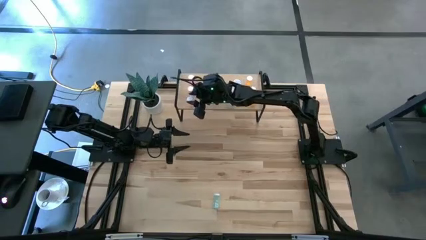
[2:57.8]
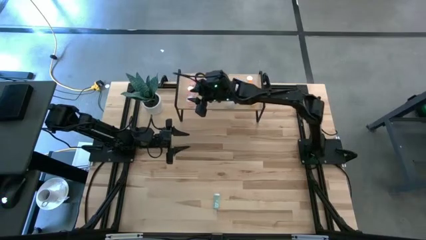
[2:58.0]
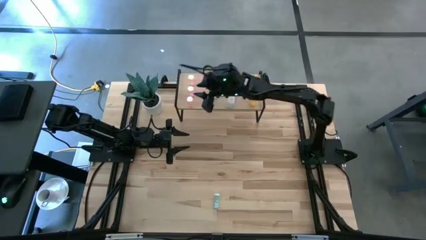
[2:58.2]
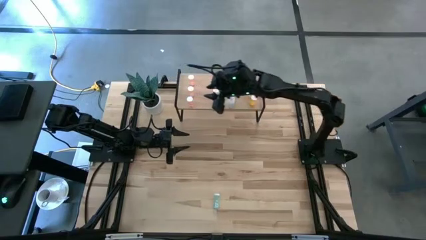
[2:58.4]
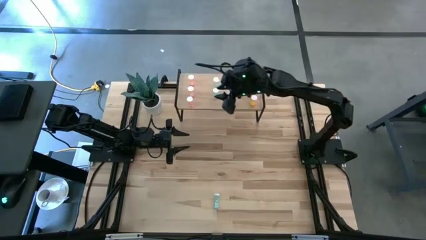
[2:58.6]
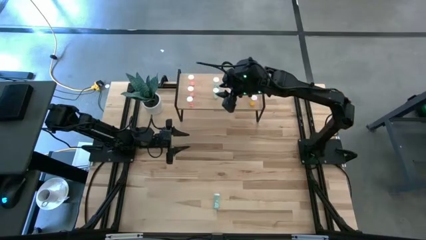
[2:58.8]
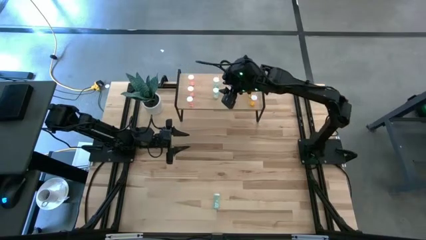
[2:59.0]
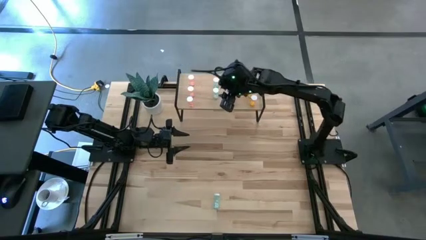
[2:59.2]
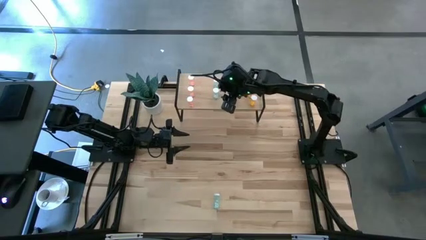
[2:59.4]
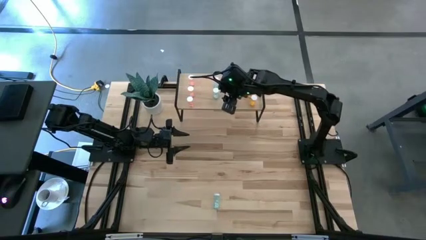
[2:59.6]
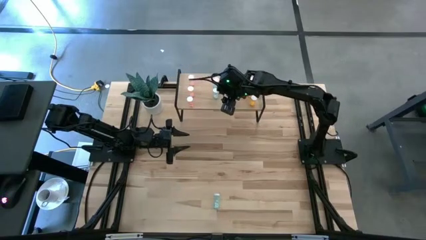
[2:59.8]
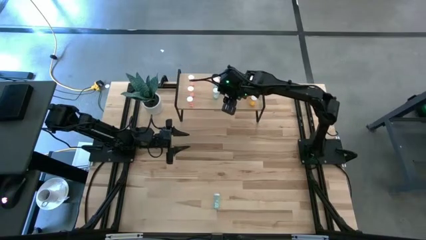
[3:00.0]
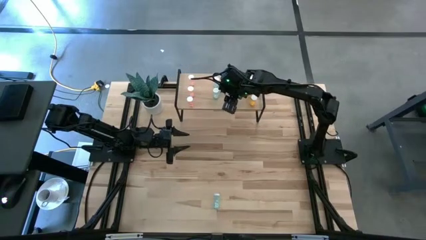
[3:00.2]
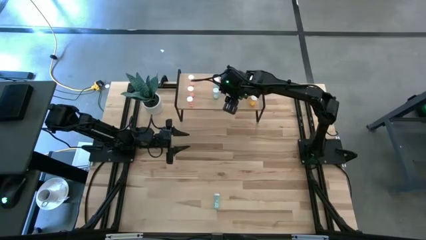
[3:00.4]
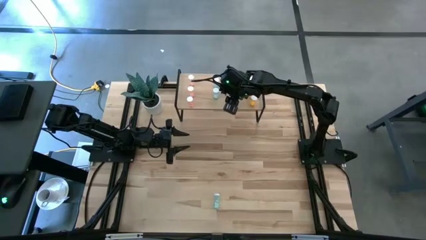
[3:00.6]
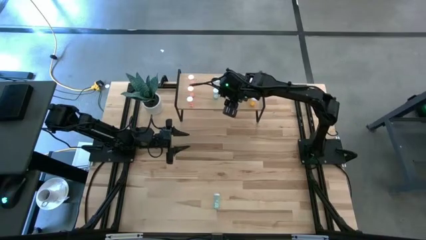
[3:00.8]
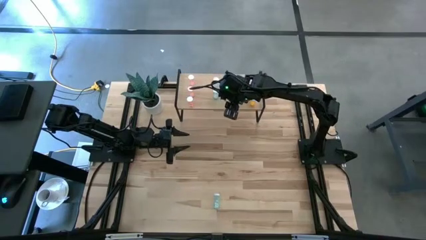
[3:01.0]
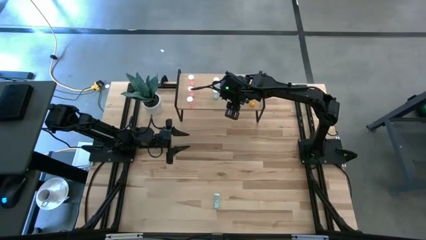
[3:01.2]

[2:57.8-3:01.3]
Task: Pick and place medicine bottles onto shelf by color
Adjust the transparent pill bottles on the shelf

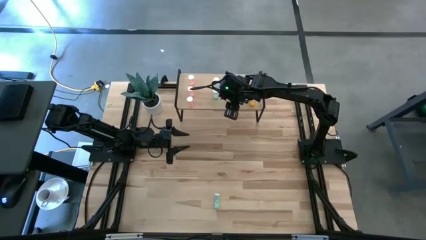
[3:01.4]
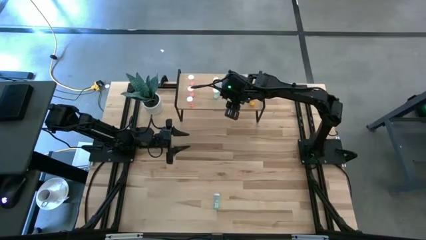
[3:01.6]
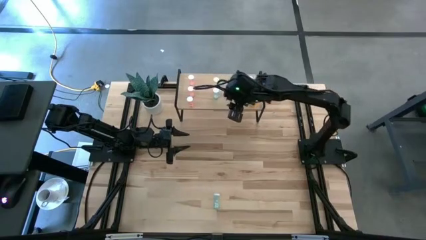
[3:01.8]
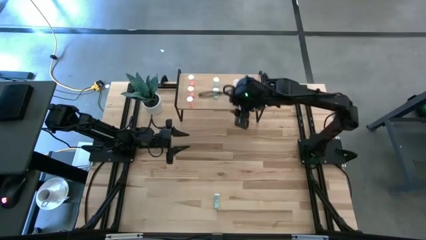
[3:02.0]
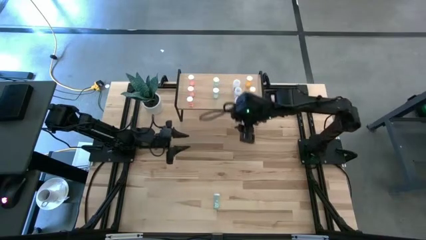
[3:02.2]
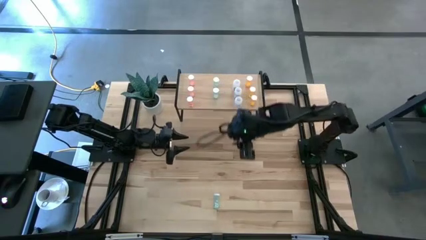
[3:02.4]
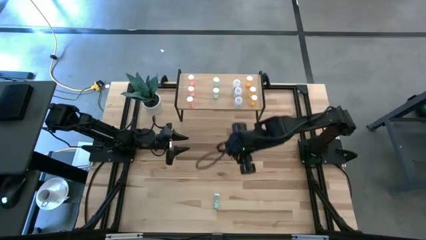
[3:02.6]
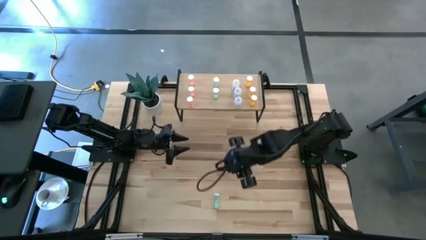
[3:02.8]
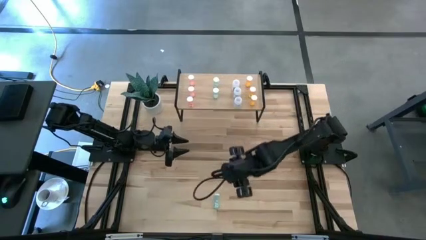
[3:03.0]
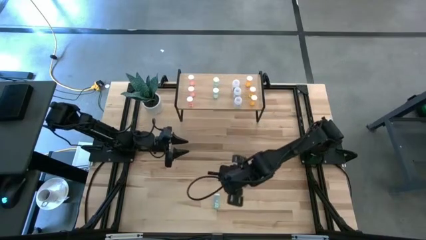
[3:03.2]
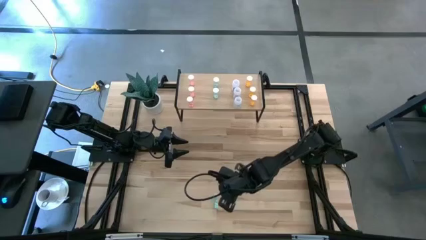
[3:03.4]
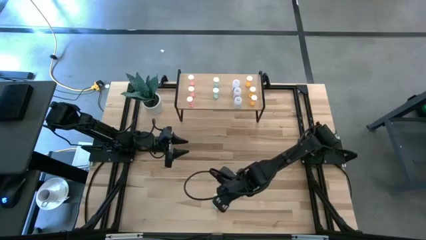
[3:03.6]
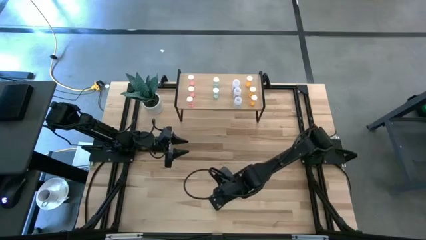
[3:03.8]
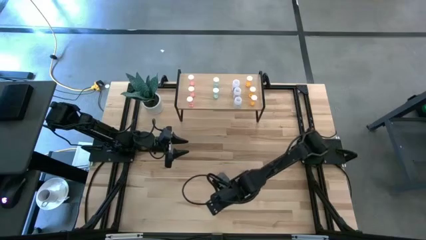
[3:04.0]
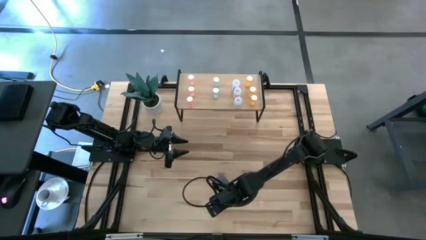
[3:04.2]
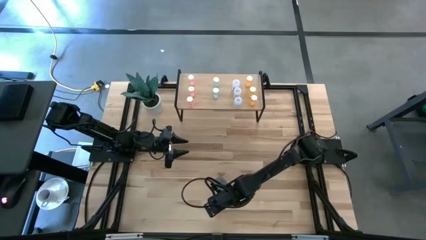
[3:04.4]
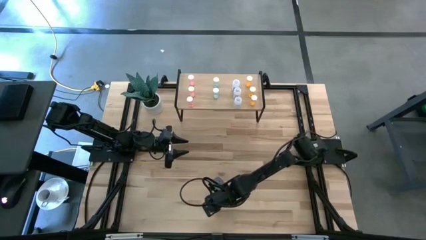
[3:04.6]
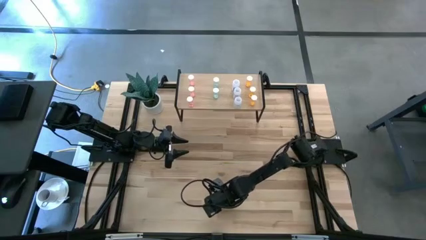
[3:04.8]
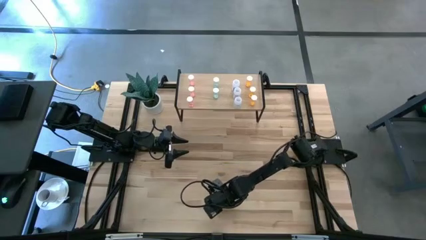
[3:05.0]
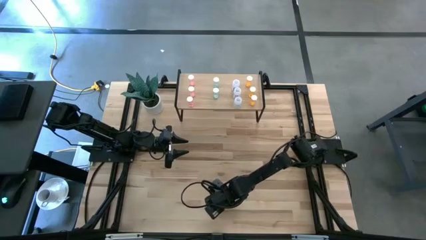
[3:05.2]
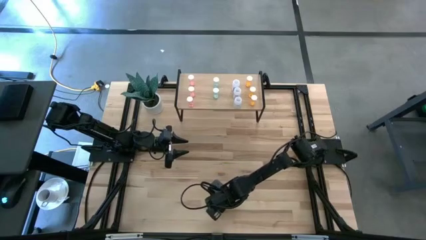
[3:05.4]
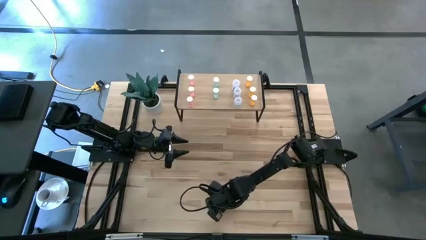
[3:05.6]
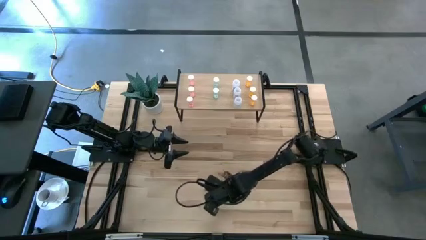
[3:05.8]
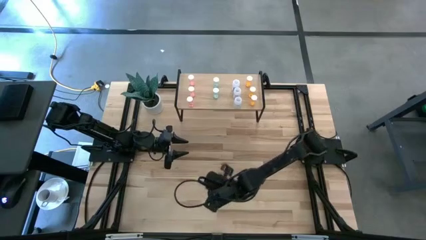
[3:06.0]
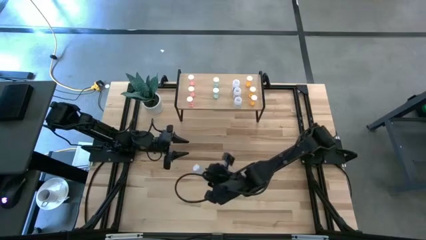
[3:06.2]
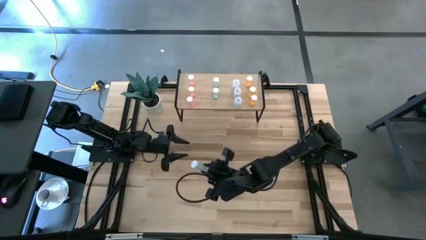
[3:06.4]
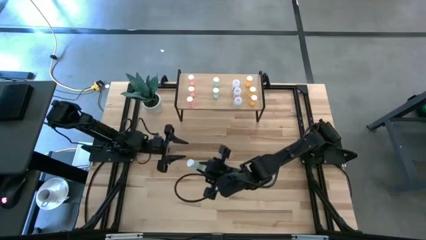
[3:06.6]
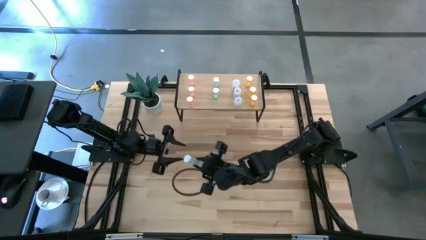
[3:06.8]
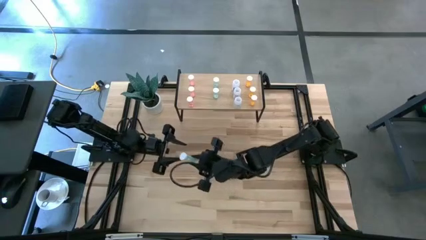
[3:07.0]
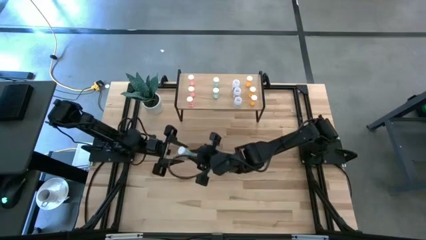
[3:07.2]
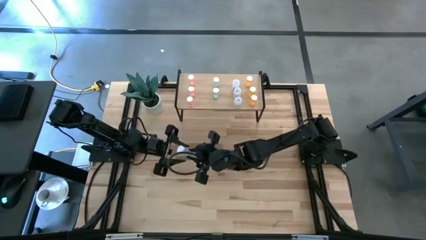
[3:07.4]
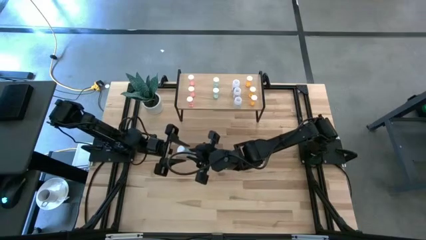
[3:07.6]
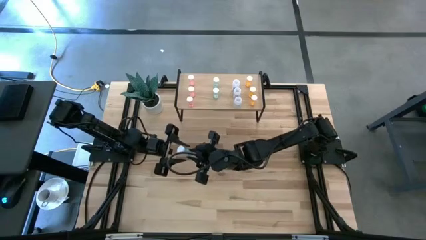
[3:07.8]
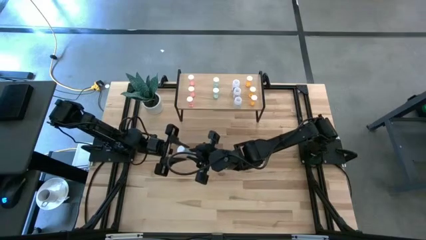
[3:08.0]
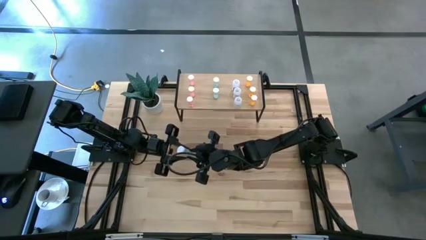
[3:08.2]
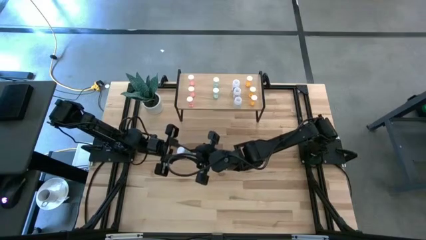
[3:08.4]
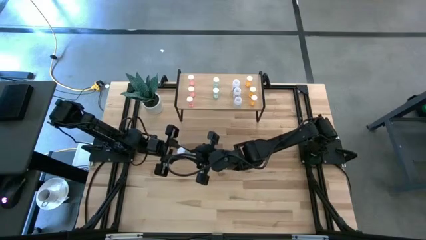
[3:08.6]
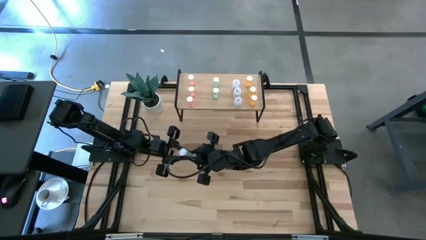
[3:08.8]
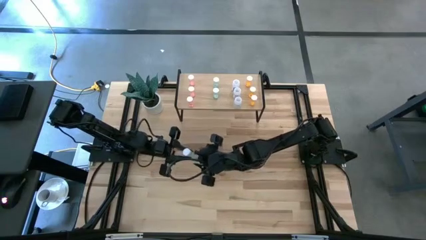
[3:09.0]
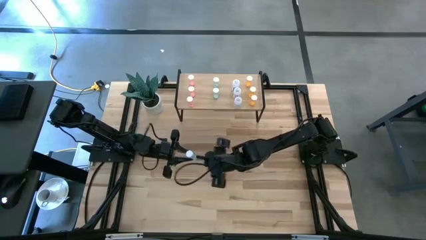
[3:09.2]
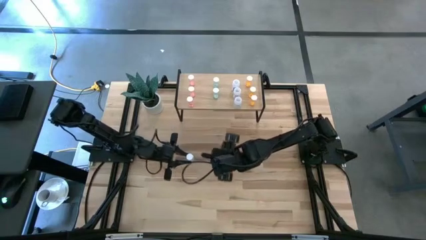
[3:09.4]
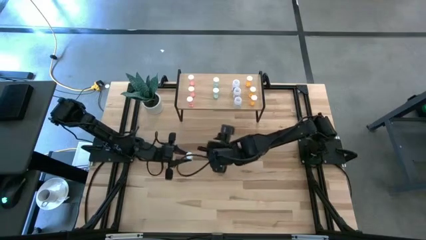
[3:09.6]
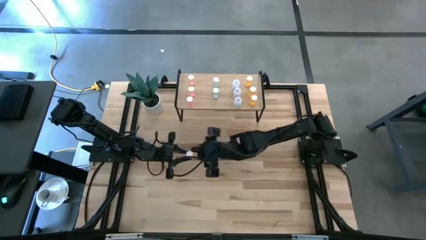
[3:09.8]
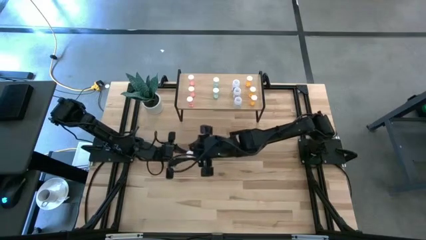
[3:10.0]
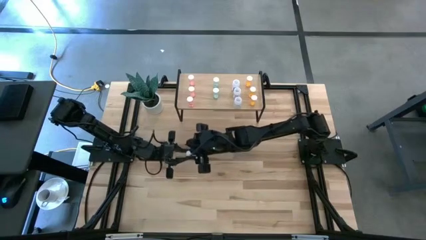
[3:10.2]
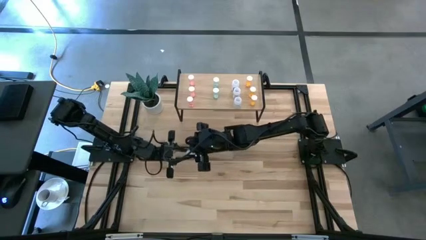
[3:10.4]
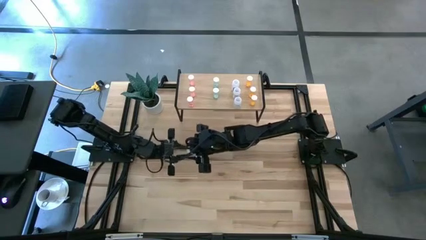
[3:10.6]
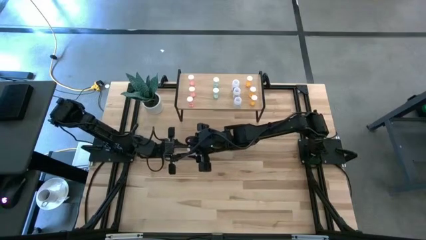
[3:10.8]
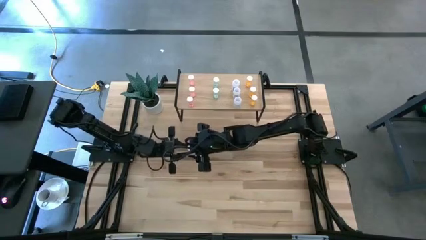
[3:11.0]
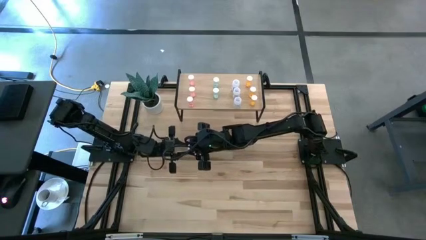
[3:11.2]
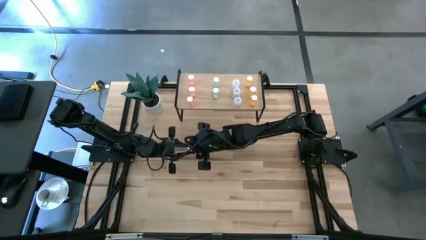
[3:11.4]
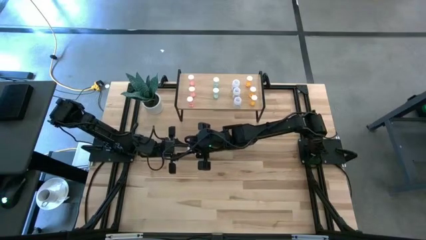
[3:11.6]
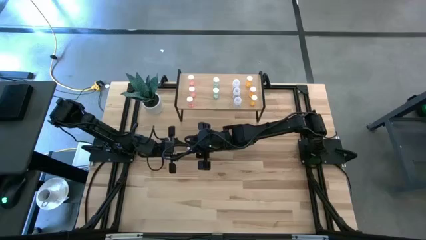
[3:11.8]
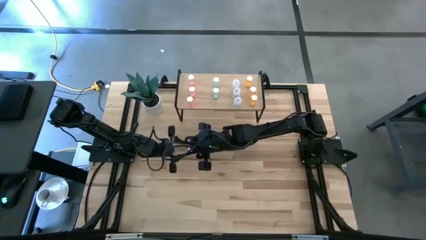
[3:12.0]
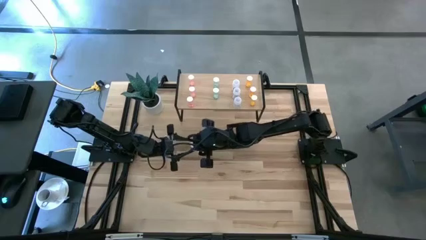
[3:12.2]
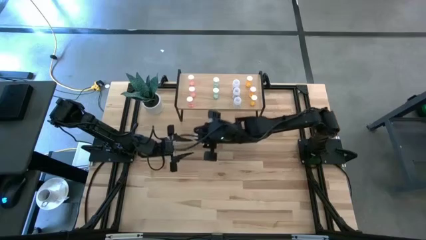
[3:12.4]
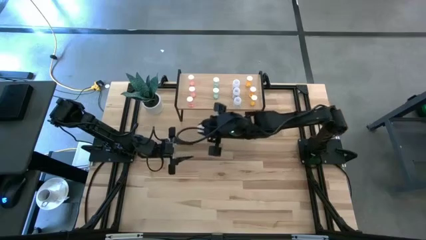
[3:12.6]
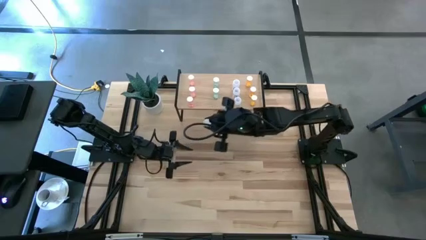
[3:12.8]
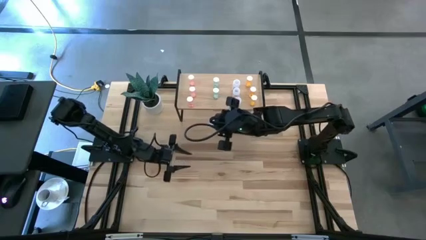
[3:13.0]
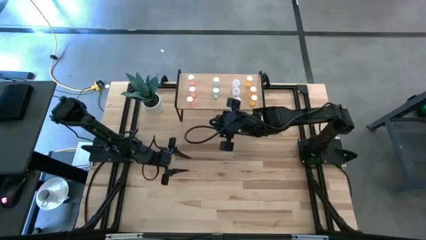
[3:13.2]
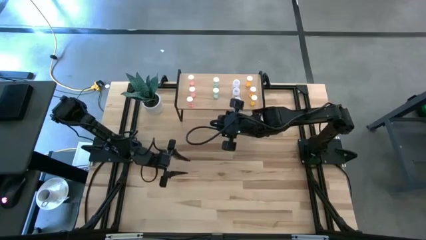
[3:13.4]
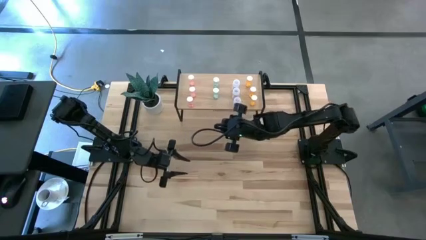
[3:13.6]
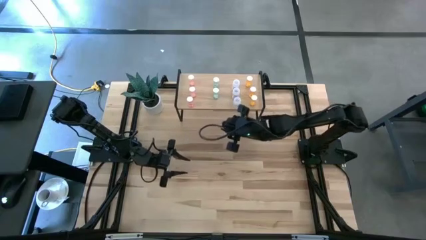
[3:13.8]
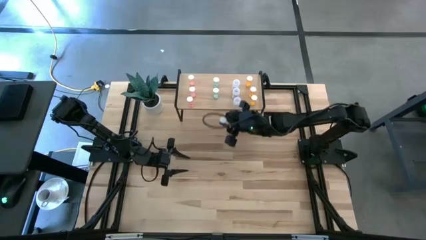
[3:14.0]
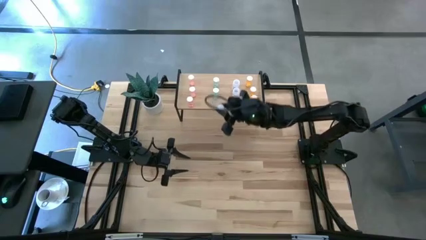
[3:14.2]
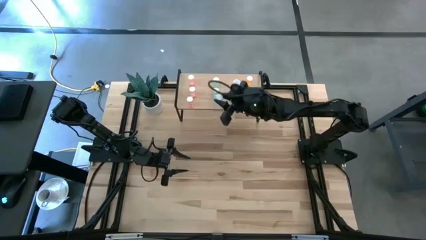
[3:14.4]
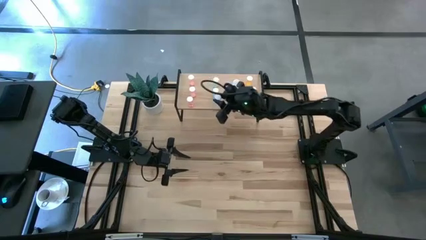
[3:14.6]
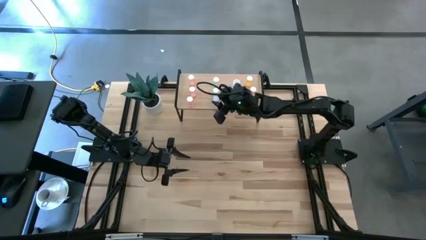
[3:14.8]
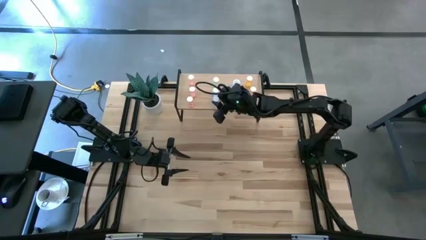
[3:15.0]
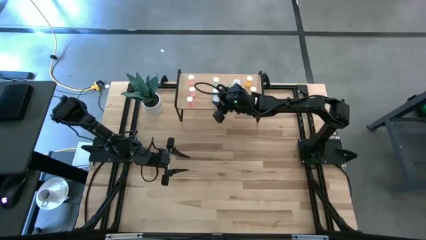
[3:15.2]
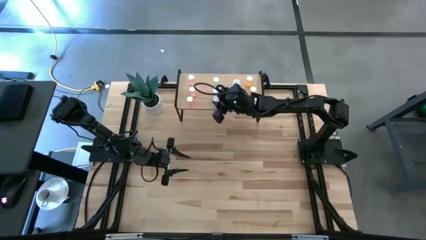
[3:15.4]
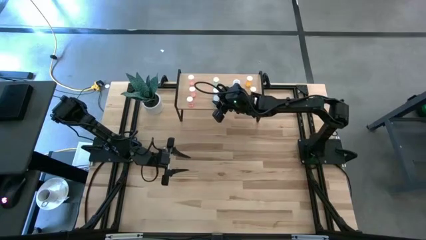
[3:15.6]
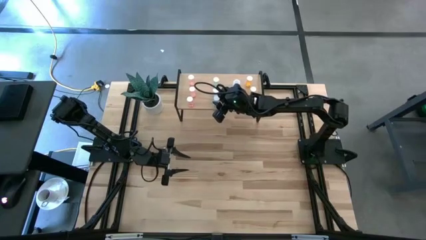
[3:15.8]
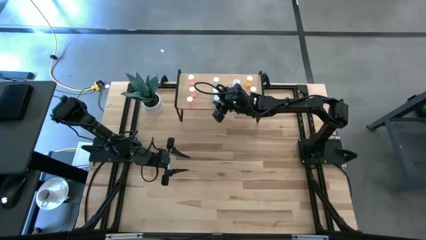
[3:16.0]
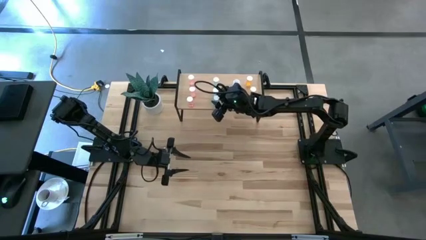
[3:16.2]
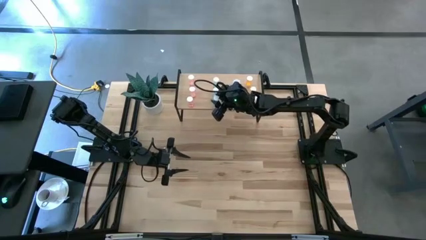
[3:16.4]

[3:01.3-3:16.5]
Put the blue pill bottle aligned with the other blue pill bottles on the shelf
